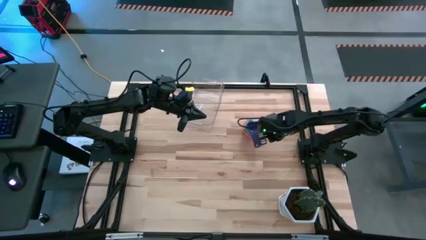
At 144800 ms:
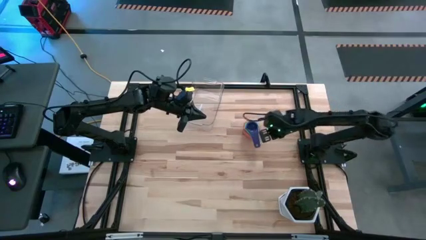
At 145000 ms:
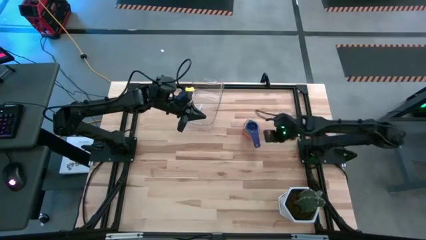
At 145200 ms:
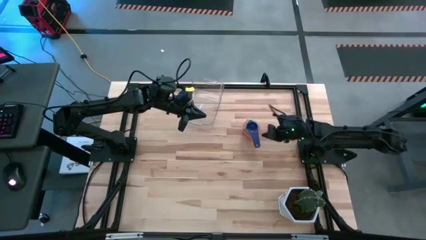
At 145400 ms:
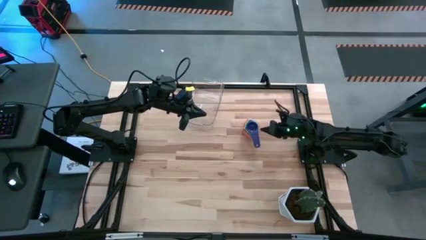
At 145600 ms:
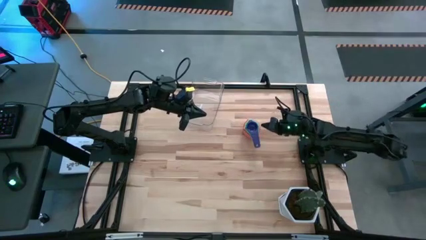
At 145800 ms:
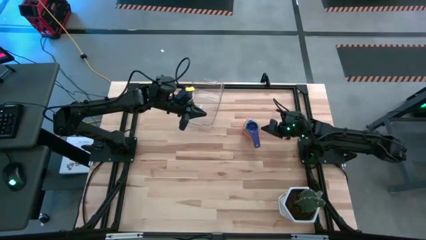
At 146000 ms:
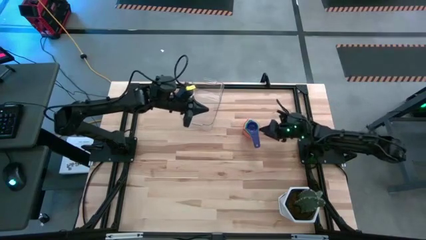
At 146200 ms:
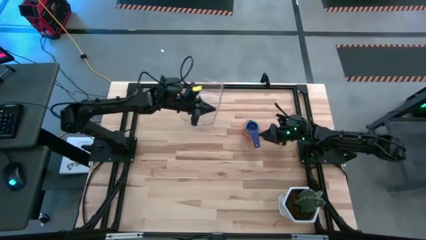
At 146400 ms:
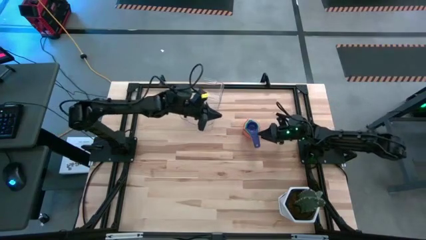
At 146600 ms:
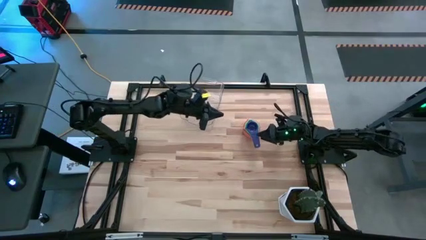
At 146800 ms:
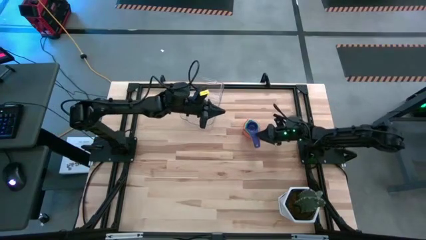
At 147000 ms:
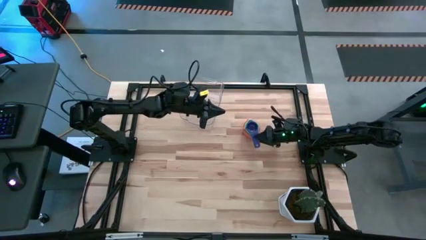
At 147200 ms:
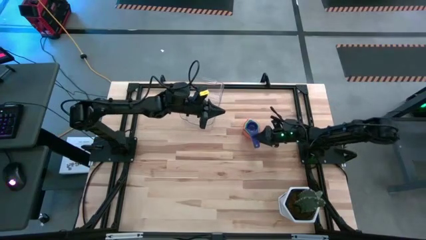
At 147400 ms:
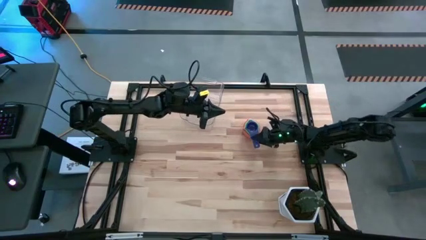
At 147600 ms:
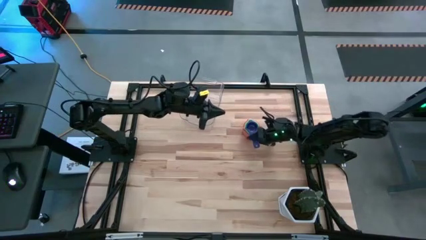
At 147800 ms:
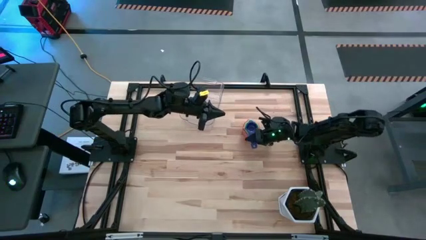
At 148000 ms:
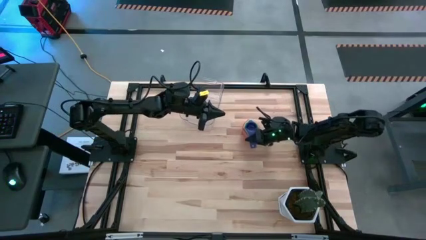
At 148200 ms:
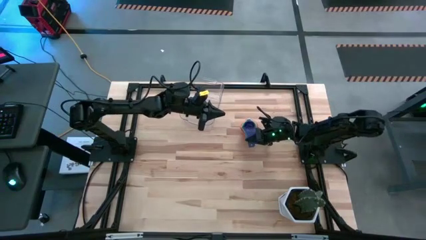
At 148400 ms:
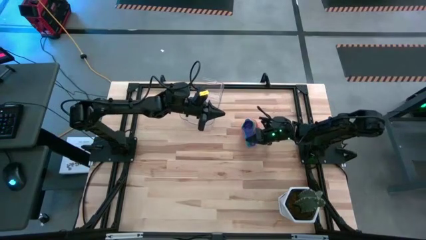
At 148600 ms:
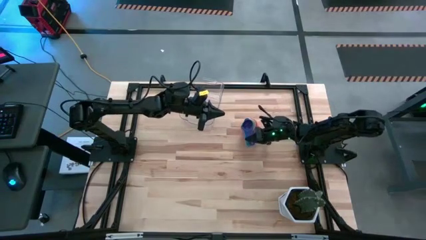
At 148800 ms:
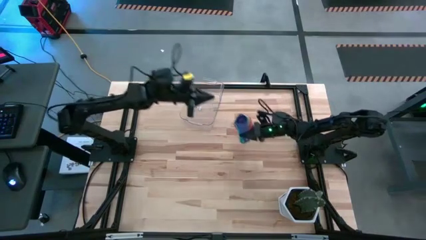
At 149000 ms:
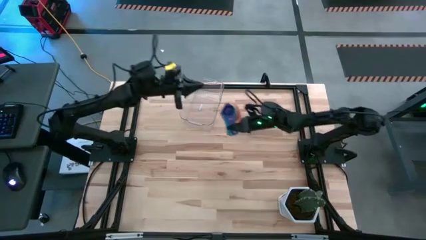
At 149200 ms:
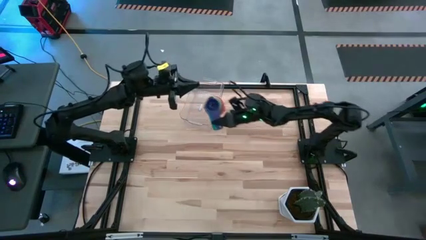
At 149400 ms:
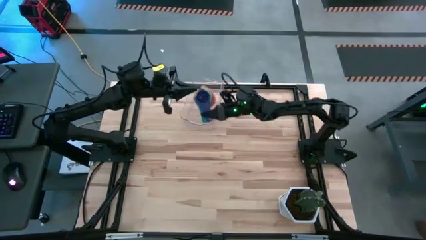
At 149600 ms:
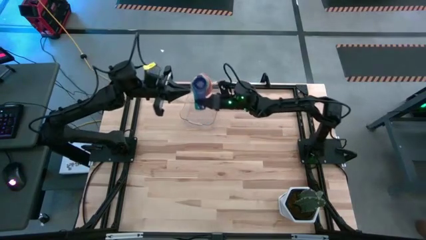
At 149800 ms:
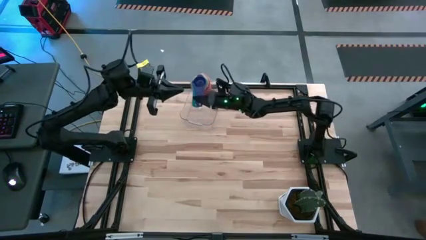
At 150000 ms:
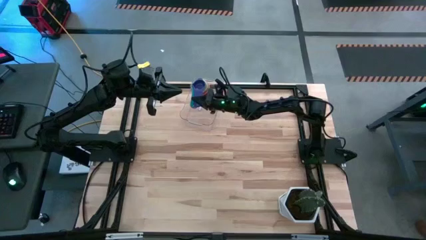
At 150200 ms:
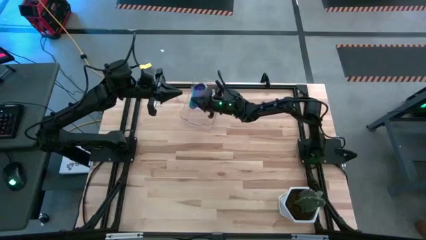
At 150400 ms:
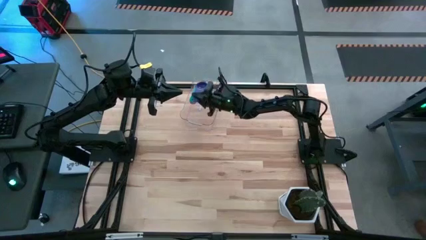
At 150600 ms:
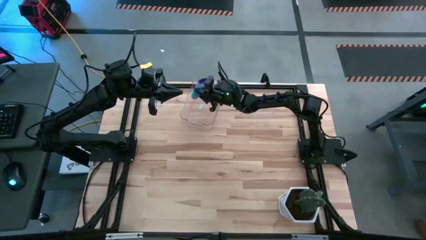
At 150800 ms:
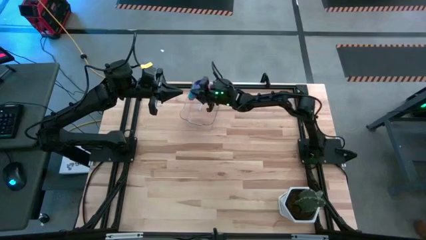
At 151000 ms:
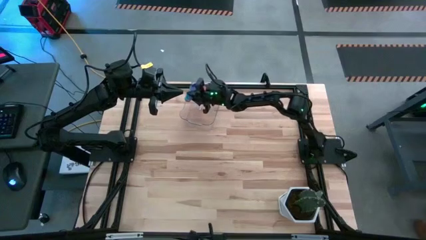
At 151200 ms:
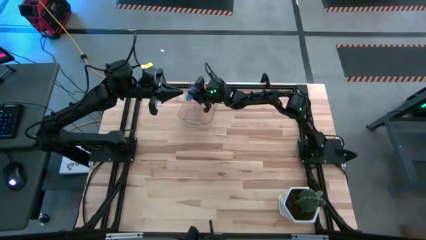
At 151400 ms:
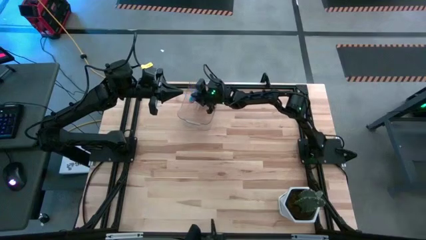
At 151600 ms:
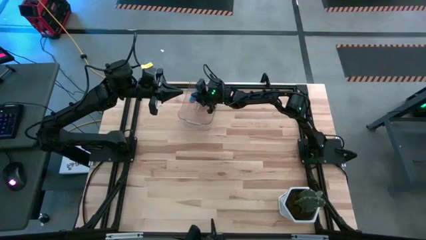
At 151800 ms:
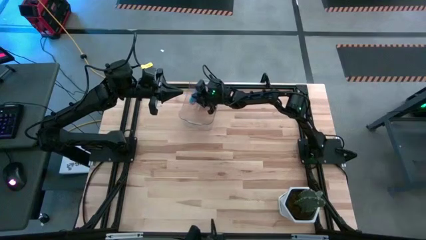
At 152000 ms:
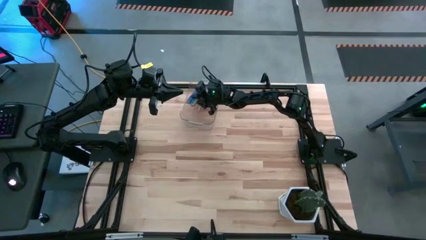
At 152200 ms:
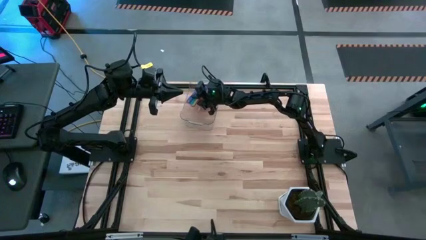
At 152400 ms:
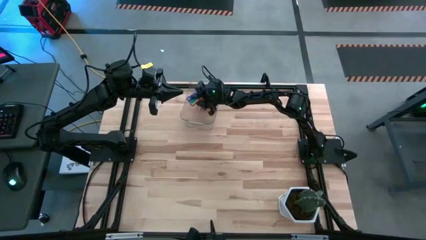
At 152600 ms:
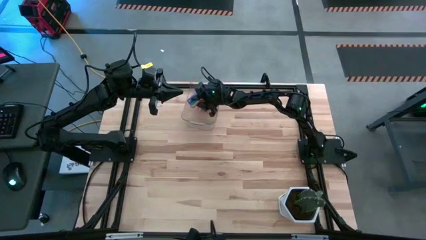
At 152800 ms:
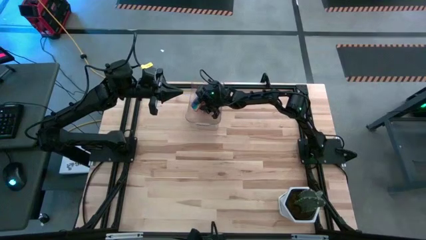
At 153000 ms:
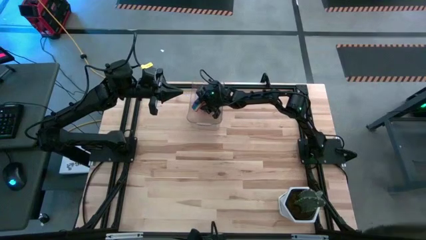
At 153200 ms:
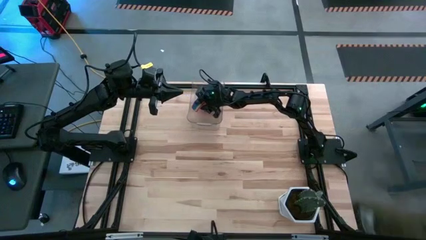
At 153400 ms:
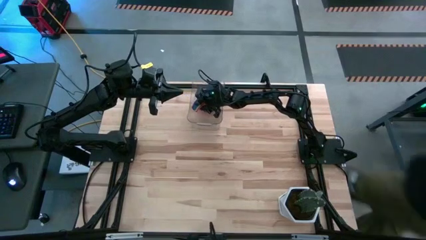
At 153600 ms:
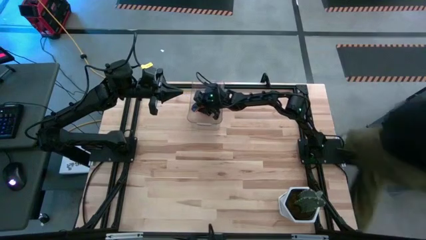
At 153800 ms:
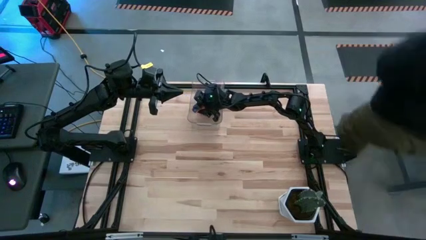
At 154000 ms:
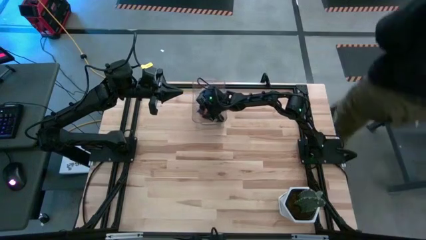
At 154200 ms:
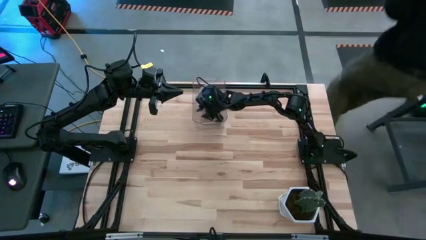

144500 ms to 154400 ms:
Task: Nest measuring cups in basket
Put the stacked colored measuring cups into the transparent bin

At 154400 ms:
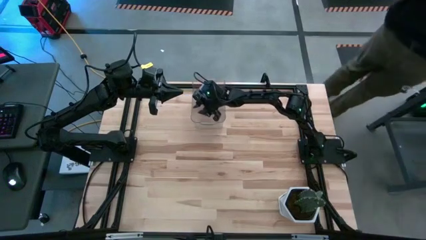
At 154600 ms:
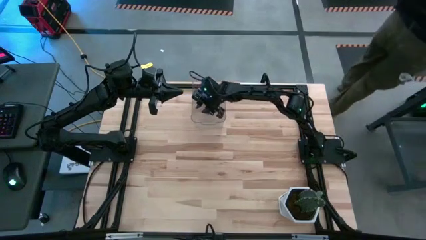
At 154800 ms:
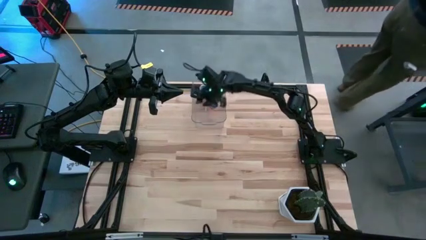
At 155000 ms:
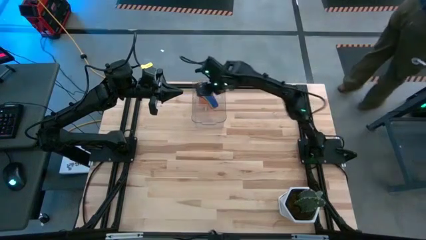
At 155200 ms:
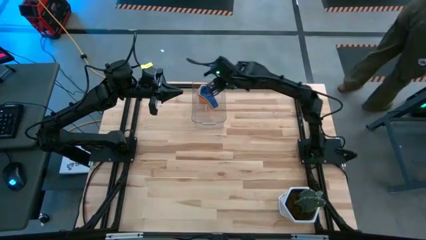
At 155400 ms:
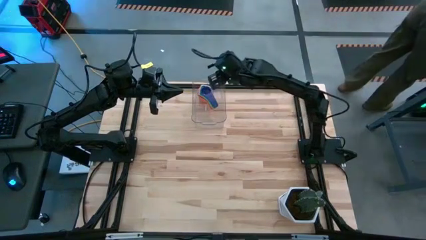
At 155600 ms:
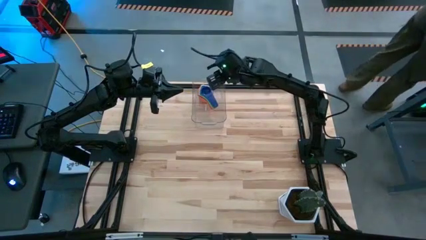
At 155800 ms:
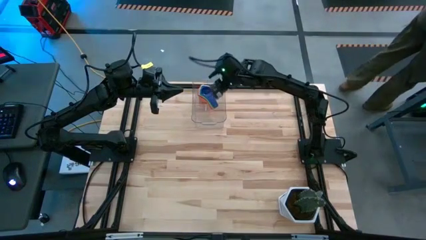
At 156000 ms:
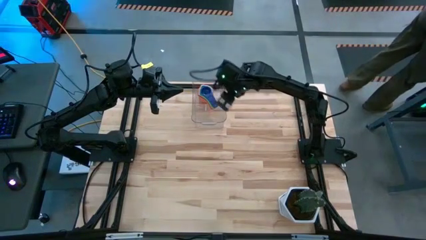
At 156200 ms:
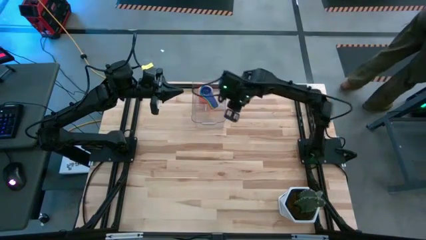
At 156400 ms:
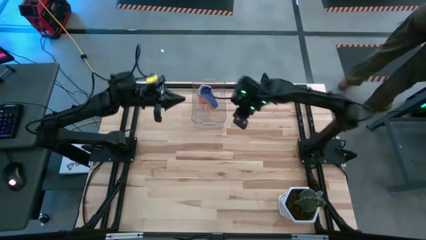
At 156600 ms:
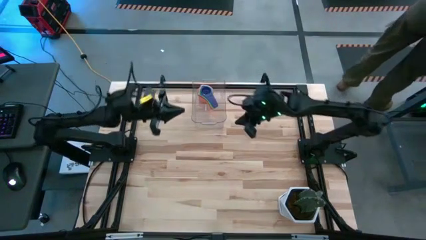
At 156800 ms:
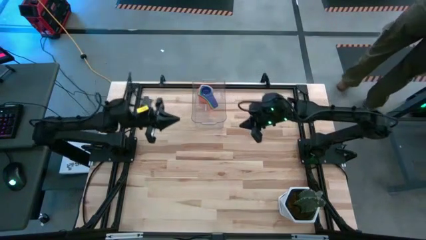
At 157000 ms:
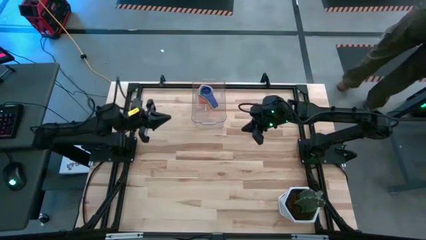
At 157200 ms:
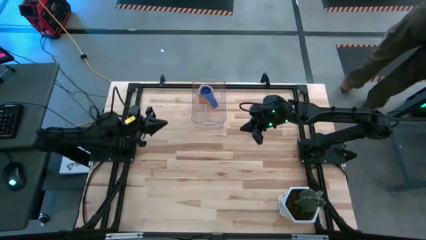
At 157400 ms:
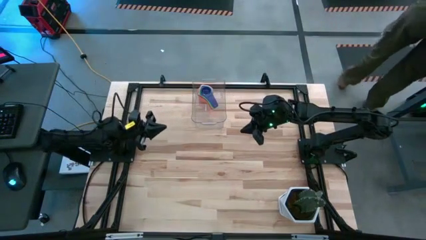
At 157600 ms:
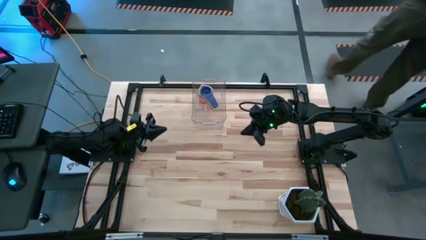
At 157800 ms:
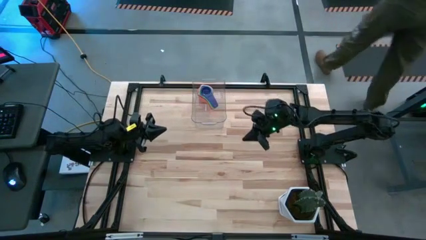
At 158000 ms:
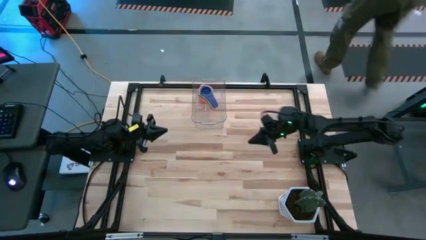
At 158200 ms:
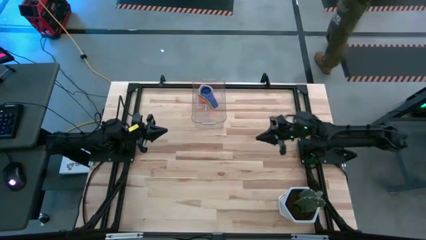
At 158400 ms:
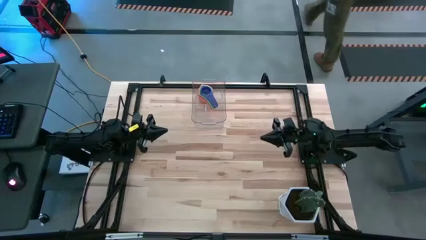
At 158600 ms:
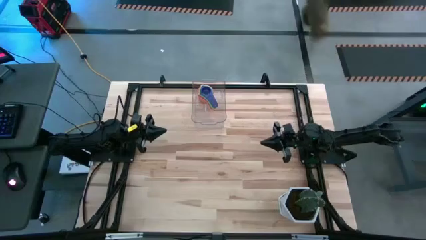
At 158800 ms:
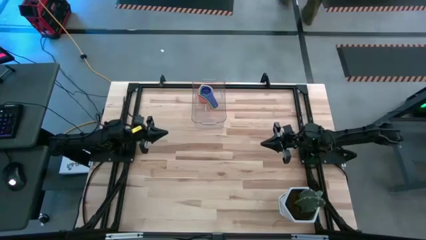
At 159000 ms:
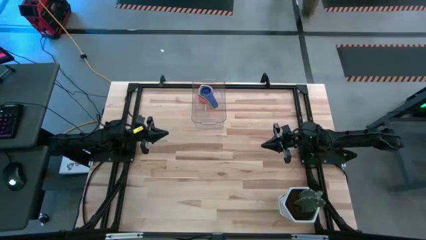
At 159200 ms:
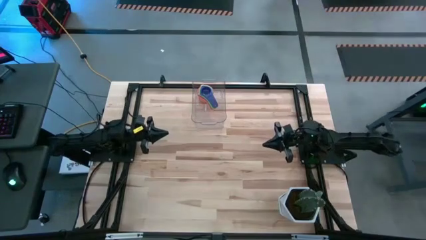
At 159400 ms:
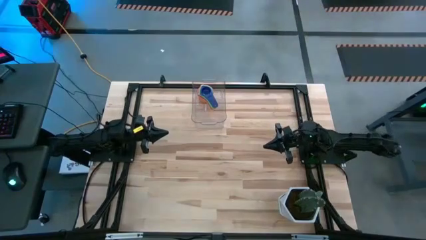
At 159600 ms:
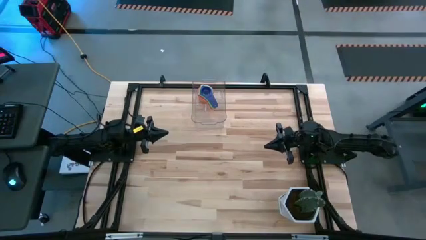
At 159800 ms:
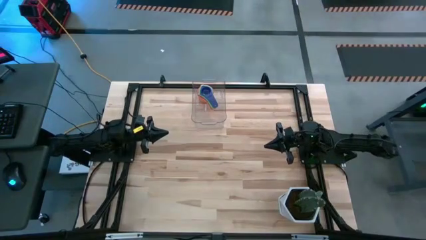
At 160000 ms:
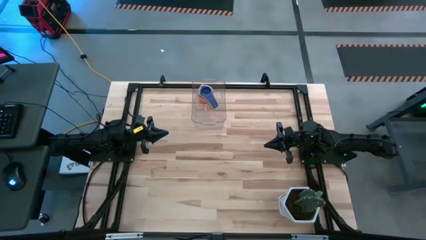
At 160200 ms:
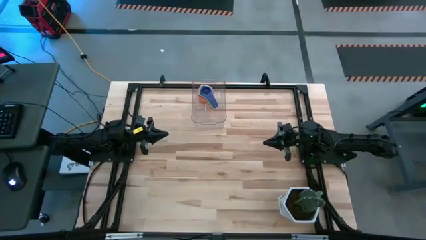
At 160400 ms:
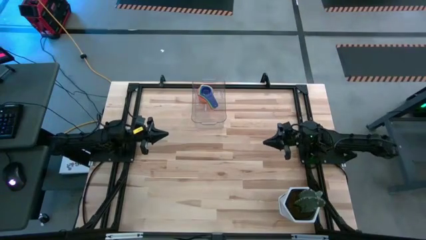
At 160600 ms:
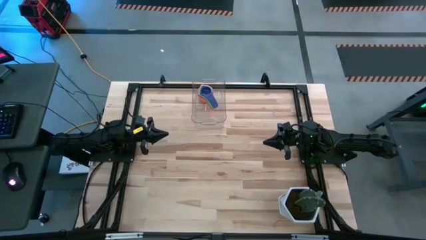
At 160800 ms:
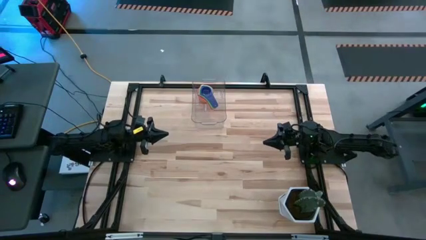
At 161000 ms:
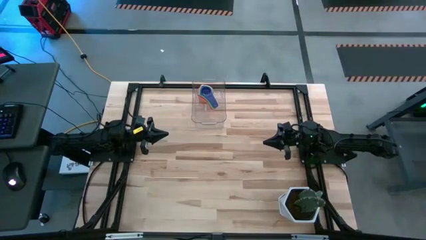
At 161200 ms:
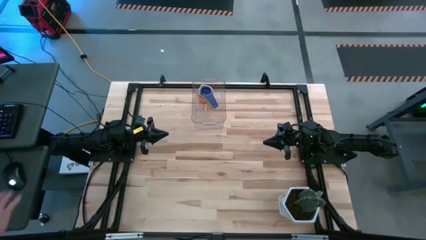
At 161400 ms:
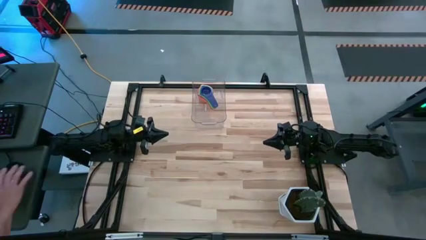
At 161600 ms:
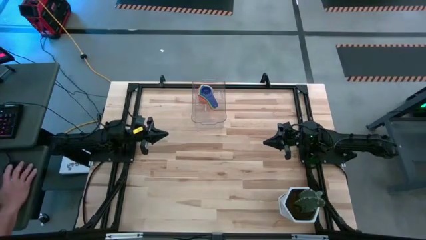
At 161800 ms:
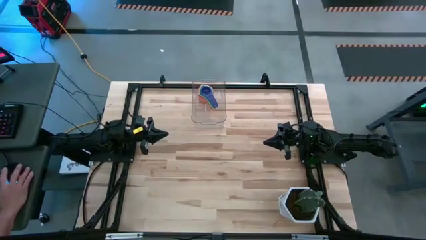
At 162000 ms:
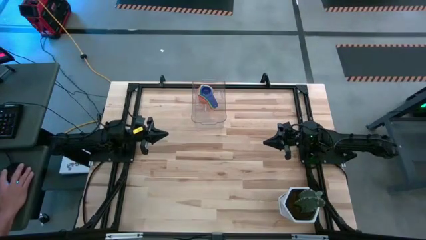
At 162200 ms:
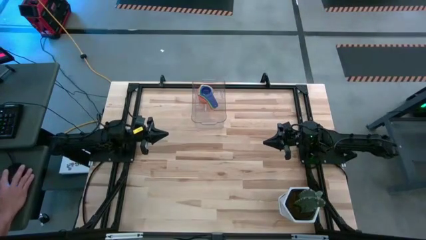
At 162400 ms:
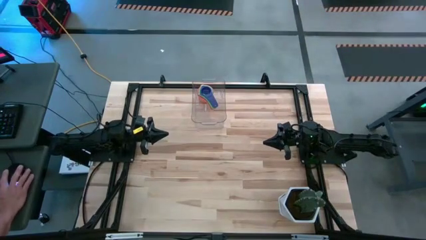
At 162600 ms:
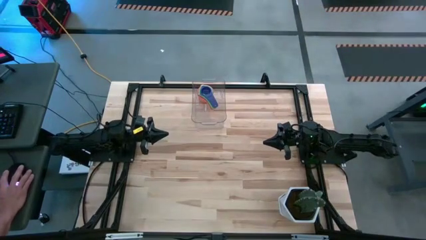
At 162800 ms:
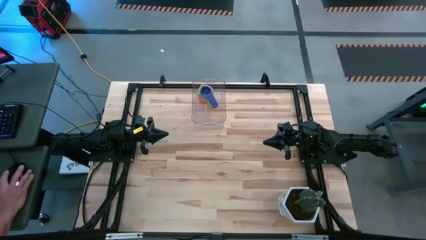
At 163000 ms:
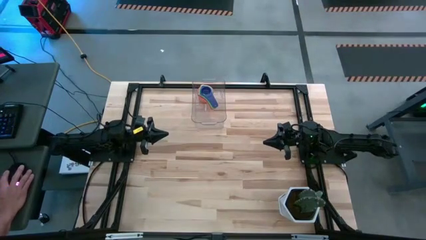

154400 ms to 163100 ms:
Return to Home Position
